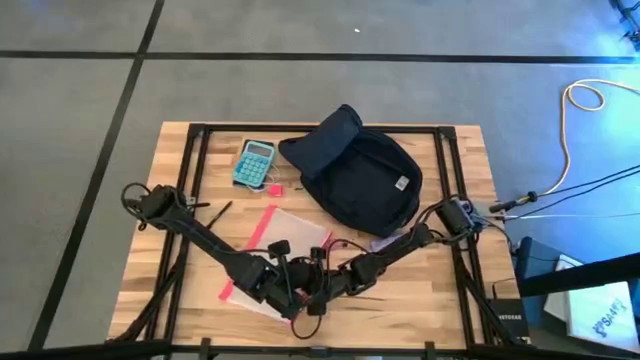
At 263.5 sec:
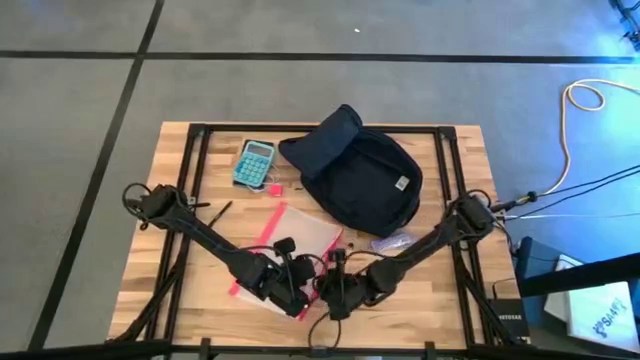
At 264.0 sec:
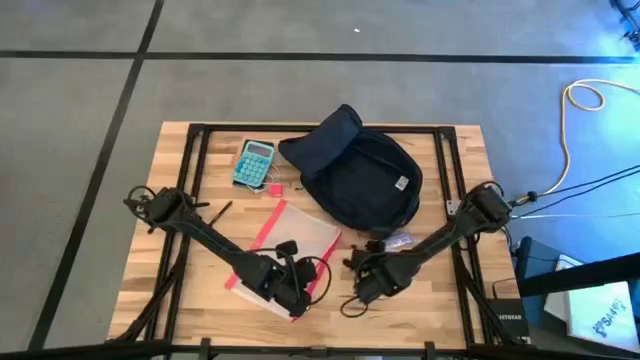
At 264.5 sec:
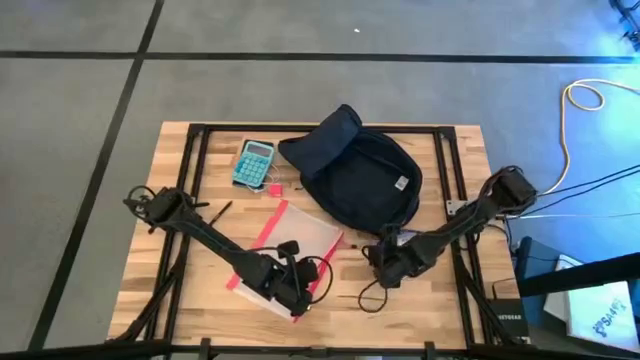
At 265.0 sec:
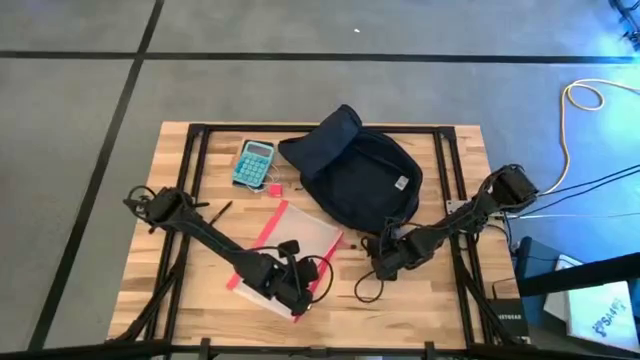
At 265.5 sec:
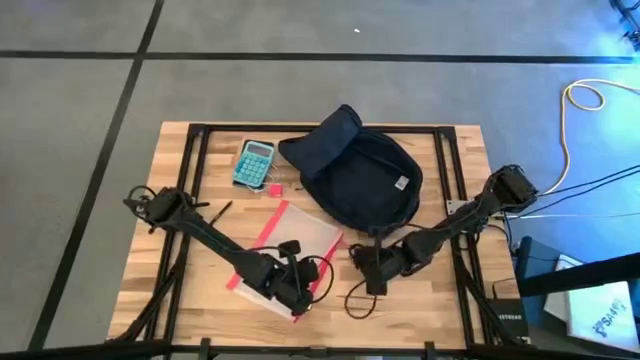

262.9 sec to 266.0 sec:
Task: Unpack backpack
Put the purple chocolate bar into the transparent zip bag

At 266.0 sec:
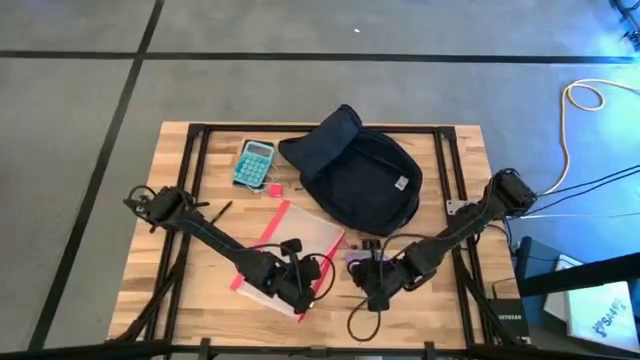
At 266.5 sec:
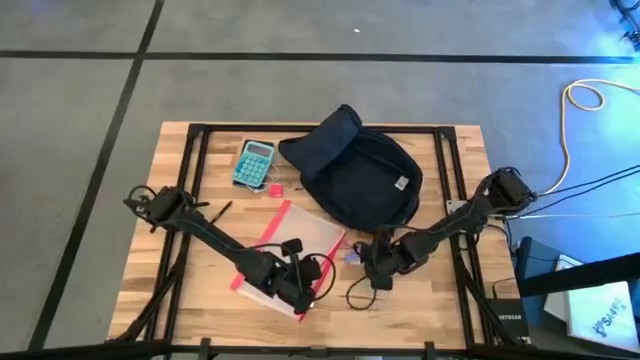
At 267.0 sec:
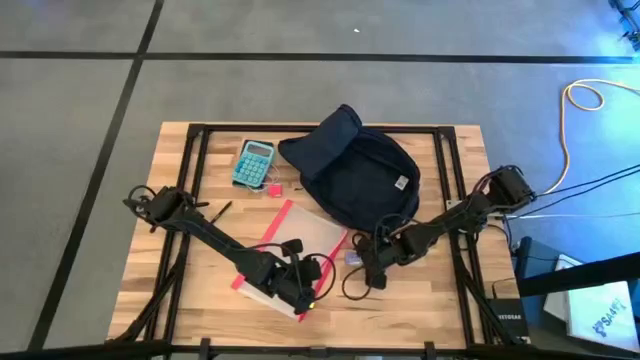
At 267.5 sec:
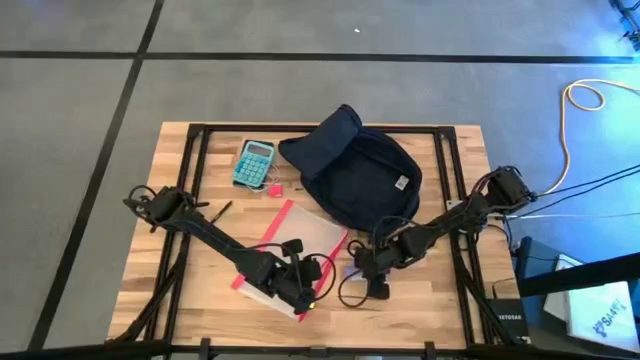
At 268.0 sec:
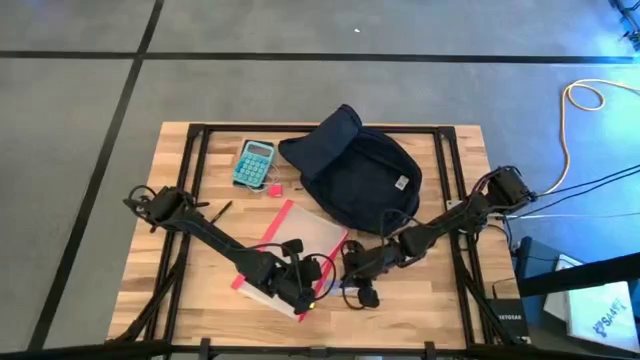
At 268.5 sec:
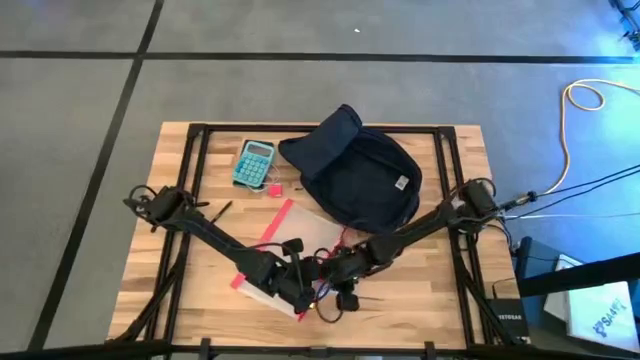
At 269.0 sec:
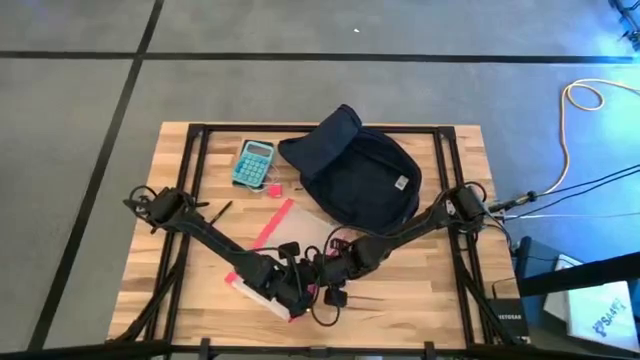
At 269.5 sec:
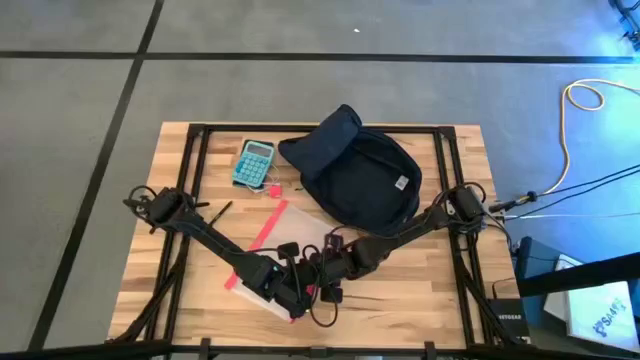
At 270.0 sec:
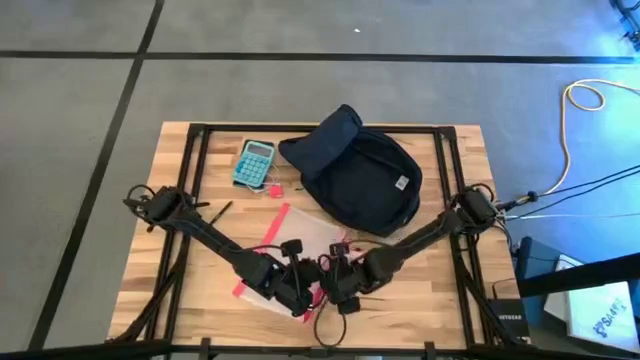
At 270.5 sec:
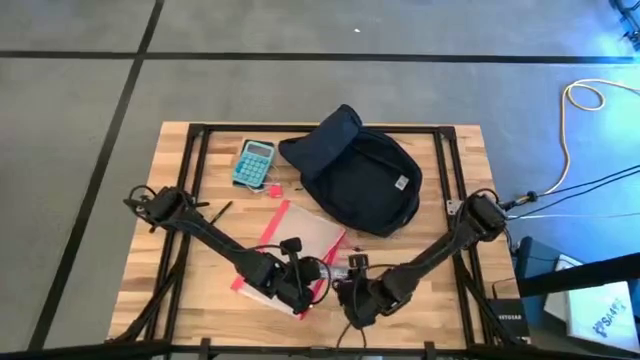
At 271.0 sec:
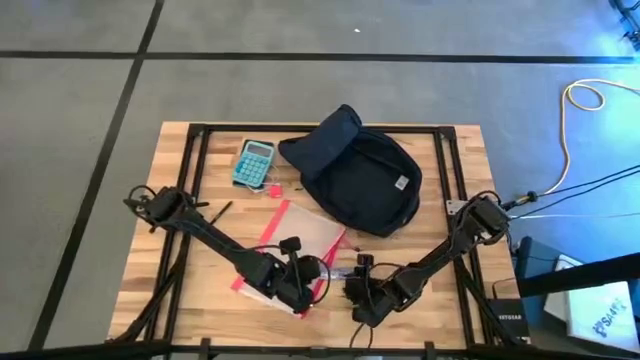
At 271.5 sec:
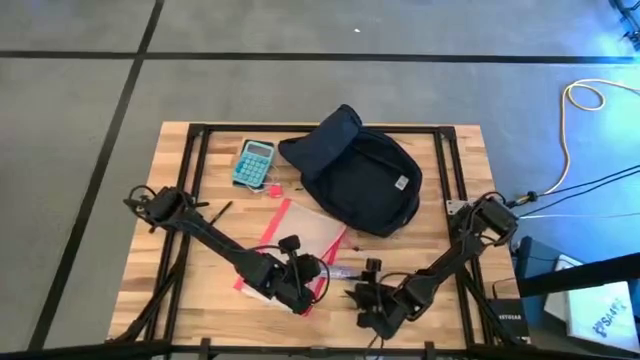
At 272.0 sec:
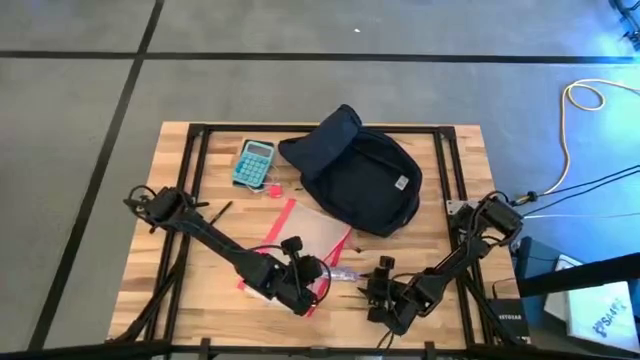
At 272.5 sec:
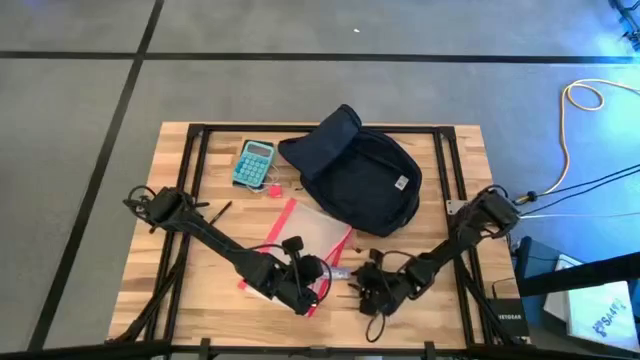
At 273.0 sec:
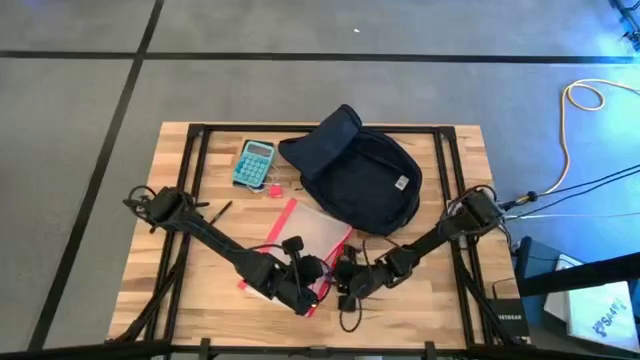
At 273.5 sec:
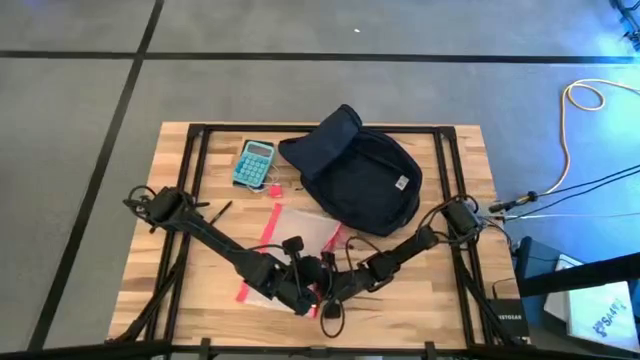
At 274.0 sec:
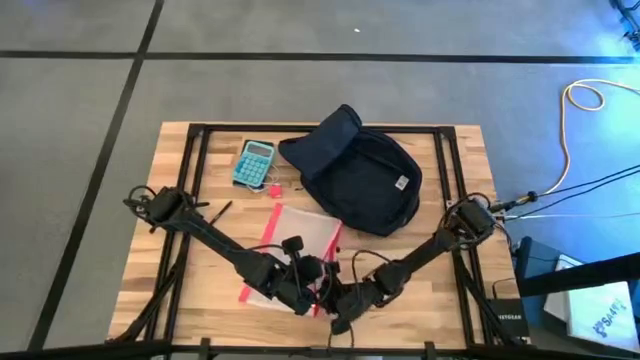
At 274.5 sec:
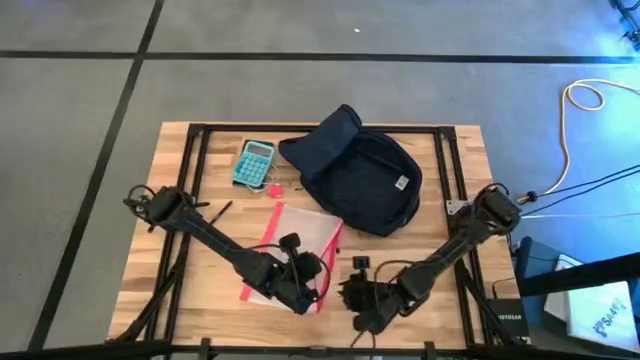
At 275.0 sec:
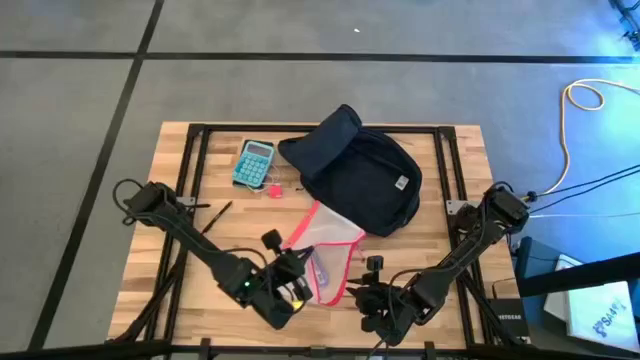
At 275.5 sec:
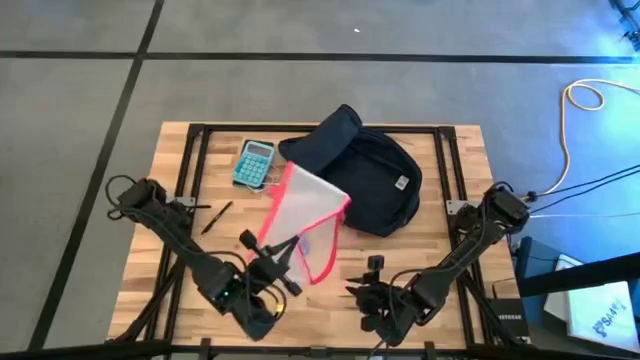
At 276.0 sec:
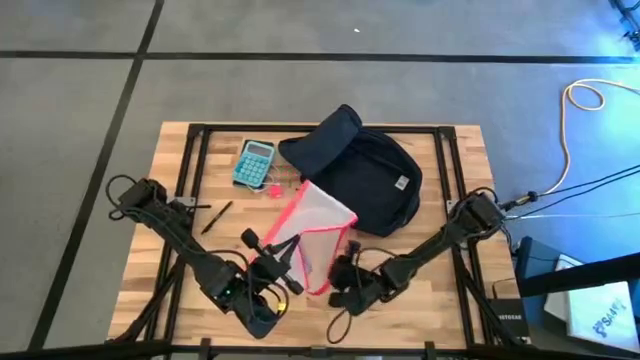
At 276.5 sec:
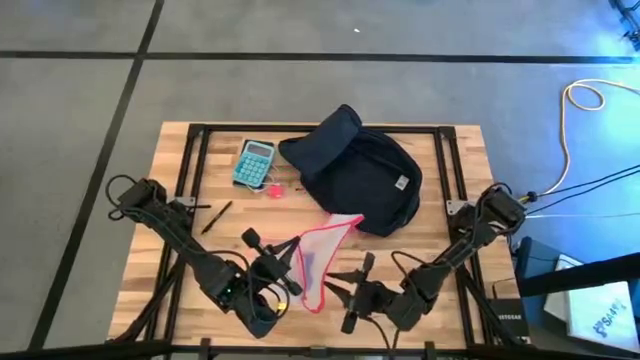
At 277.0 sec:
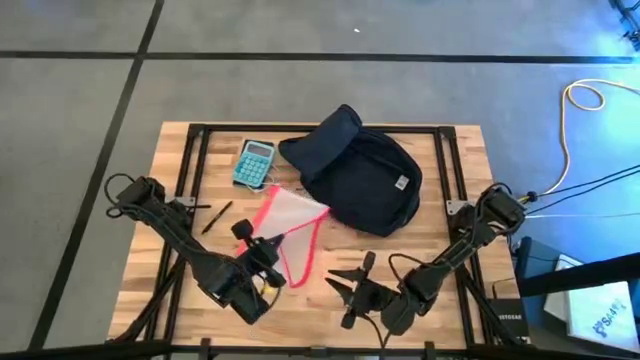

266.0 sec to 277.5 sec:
Put the purple chocolate bar into the transparent zip bag

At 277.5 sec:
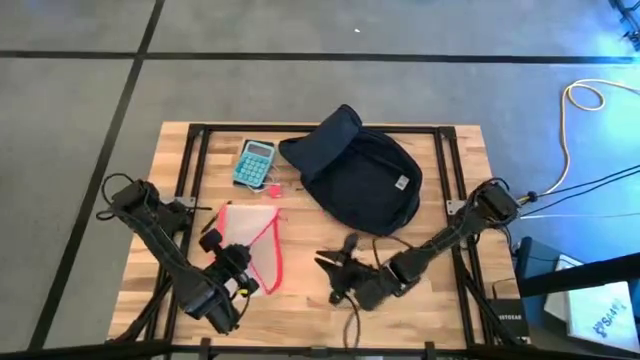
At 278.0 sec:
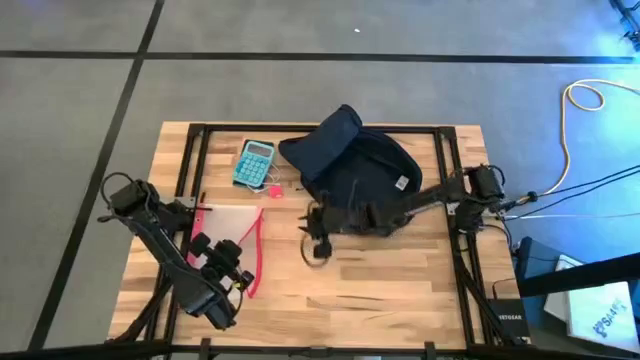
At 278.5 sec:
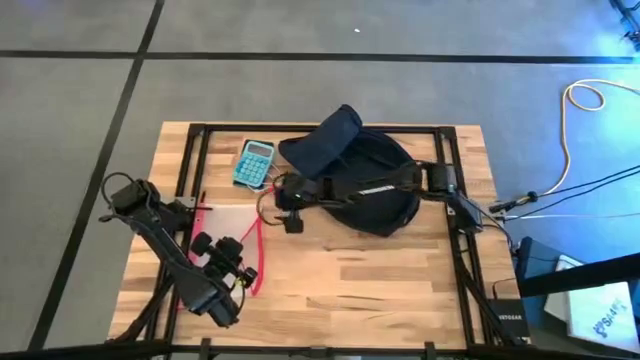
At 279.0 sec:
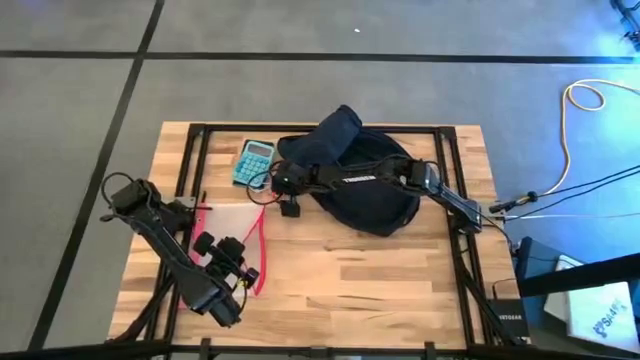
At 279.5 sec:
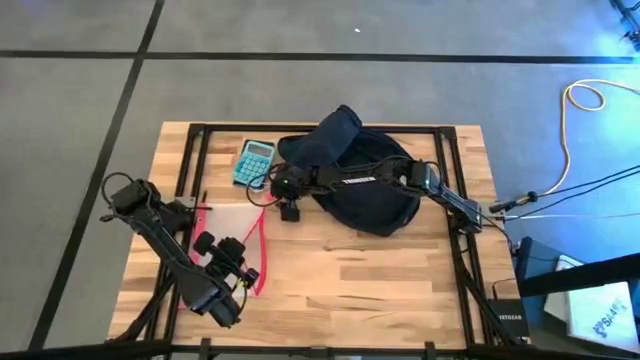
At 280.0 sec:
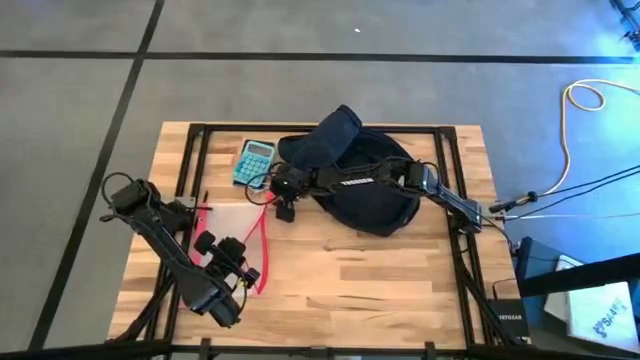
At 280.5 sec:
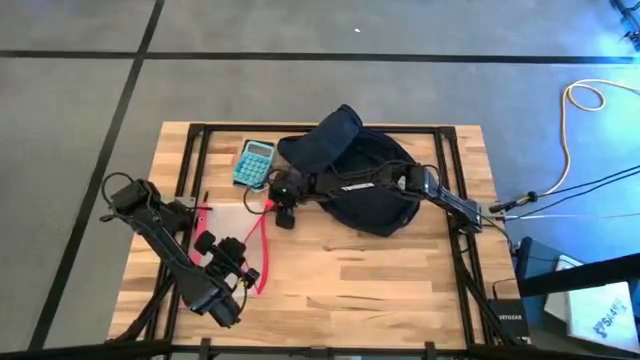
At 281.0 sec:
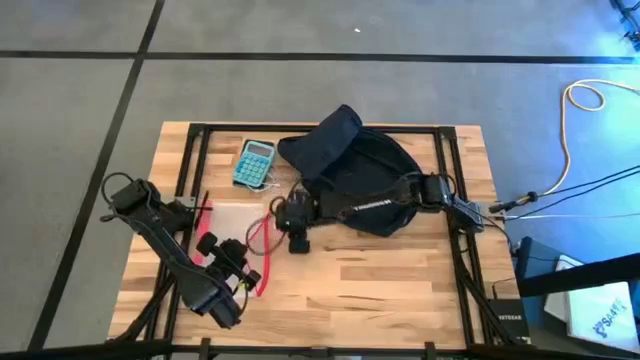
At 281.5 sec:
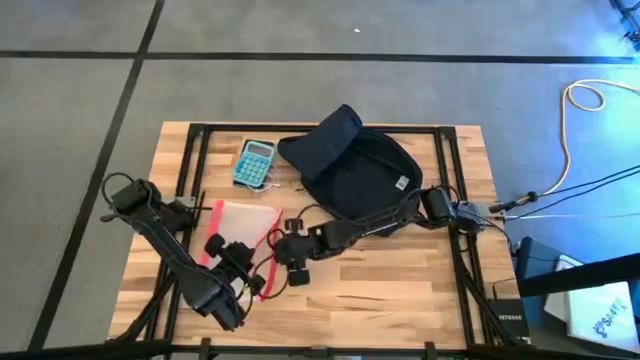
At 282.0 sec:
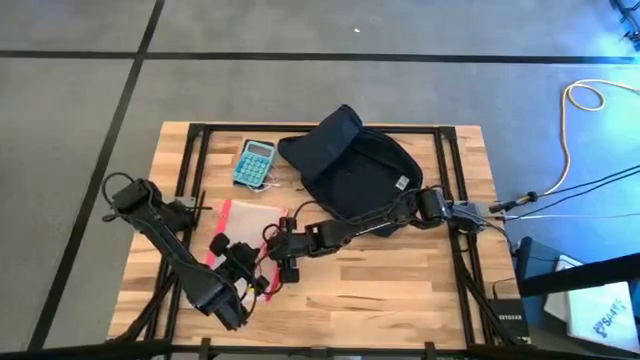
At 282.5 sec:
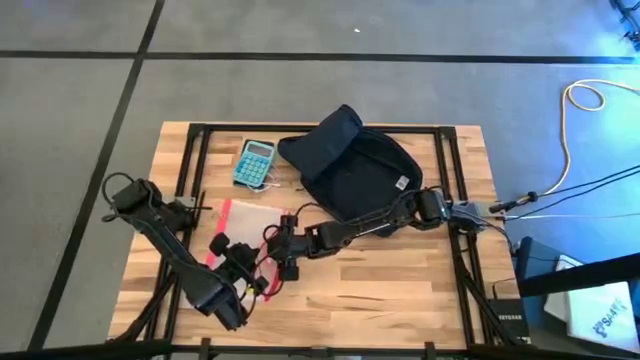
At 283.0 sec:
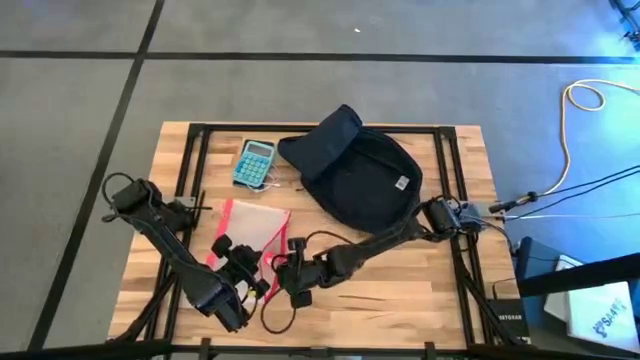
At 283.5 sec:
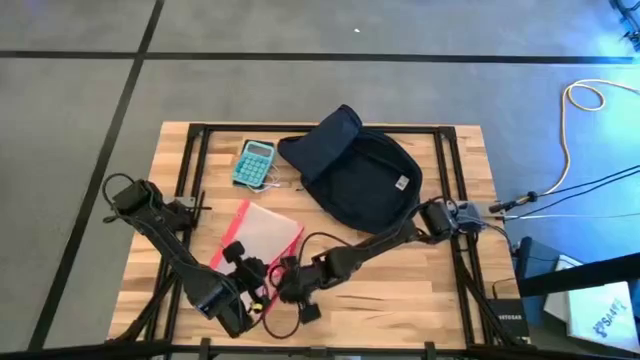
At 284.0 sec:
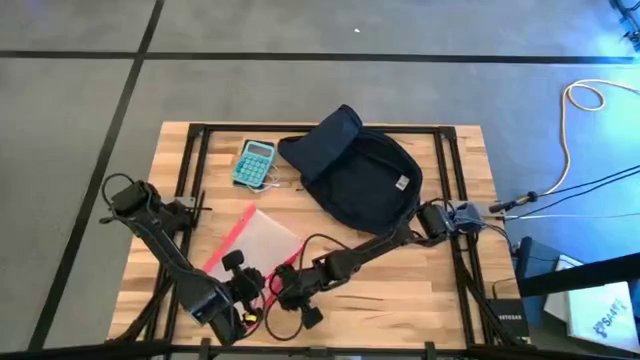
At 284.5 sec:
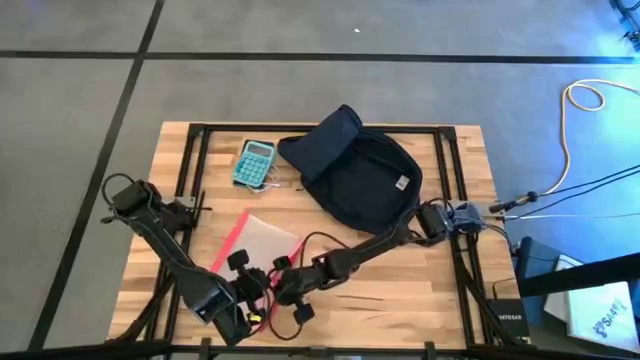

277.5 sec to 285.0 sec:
Put the red charger adapter into the transparent zip bag
